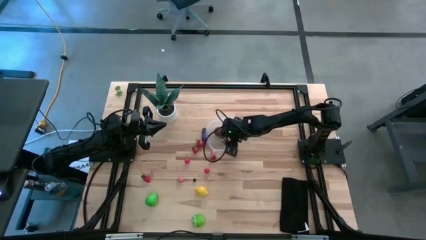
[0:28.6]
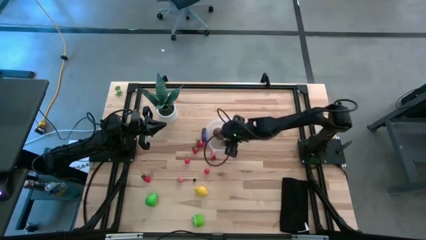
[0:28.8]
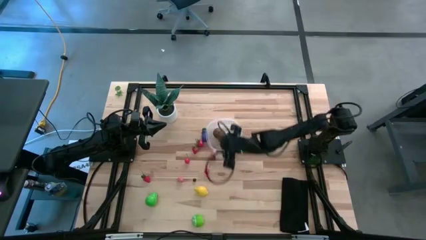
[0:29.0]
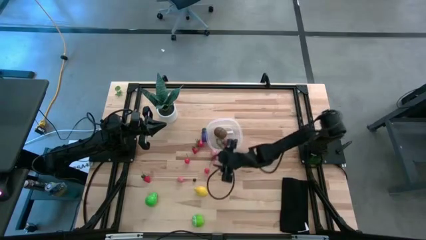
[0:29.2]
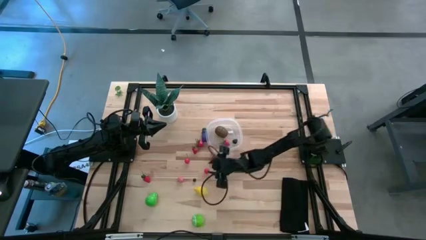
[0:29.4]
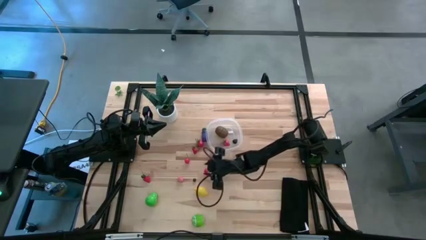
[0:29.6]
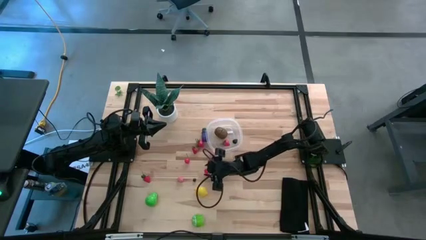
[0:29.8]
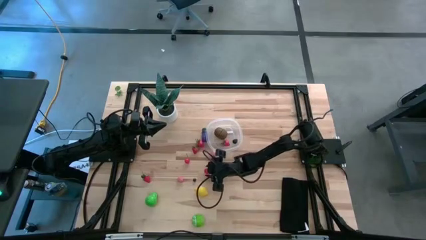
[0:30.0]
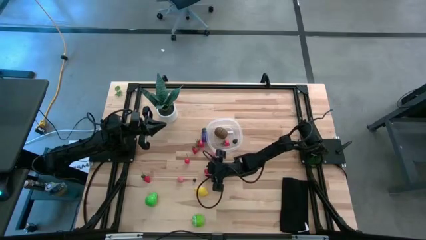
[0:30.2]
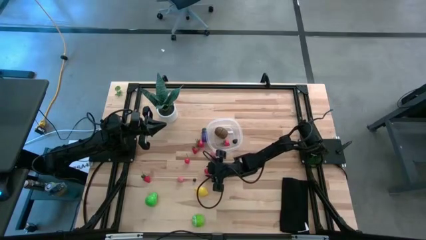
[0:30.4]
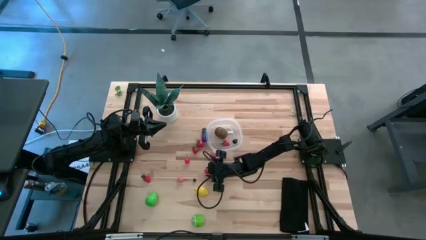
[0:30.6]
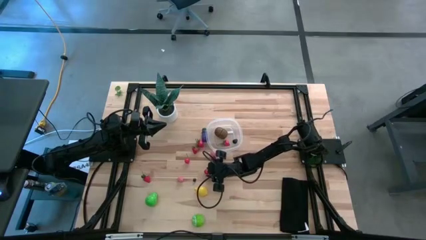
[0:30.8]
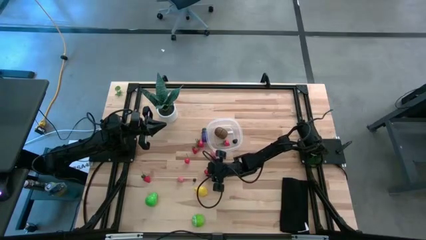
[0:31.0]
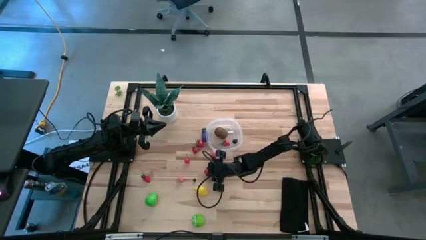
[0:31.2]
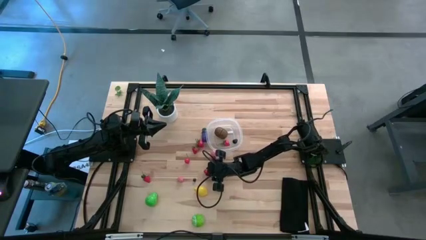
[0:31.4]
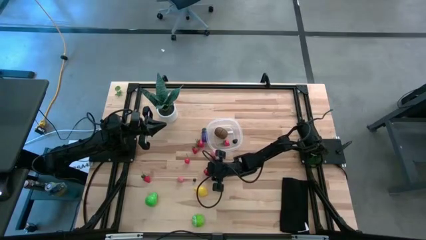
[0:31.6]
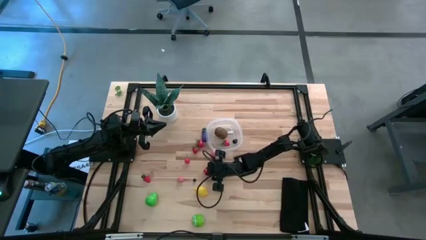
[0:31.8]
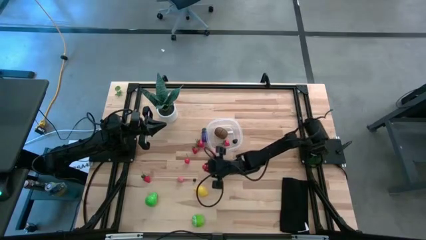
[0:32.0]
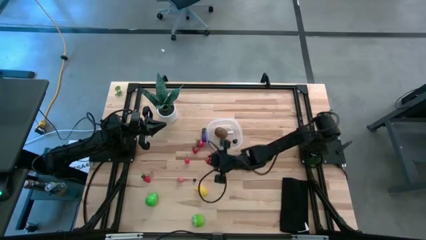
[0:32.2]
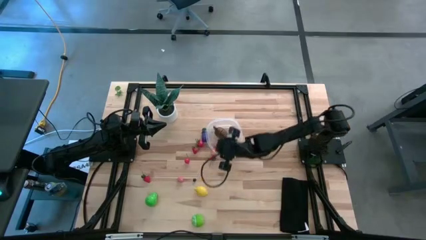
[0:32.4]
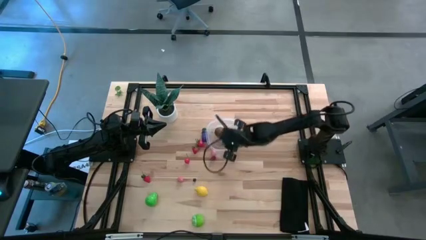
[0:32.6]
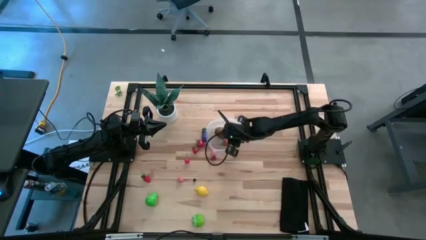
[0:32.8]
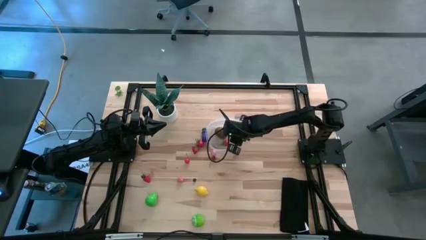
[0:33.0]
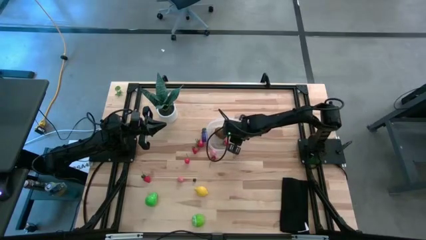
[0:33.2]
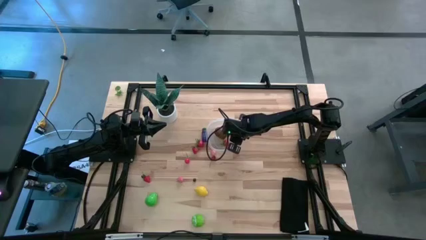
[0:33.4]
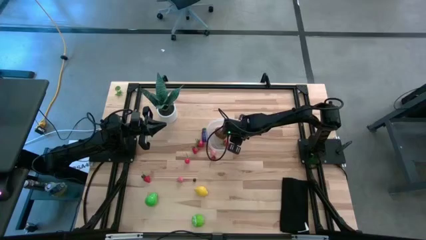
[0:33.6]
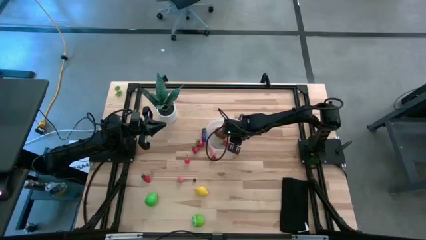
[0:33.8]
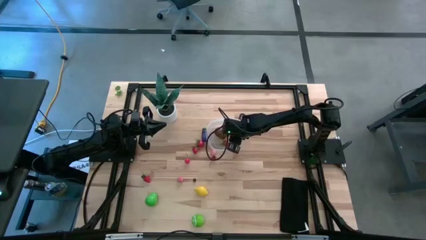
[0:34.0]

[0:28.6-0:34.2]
Task: Pick and placing Produce into tupperware
Put the bottom cherry into the transparent bin

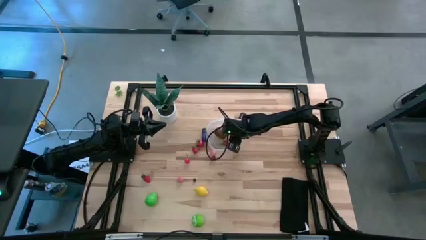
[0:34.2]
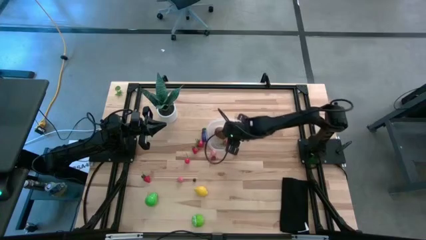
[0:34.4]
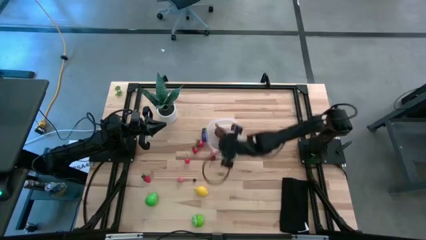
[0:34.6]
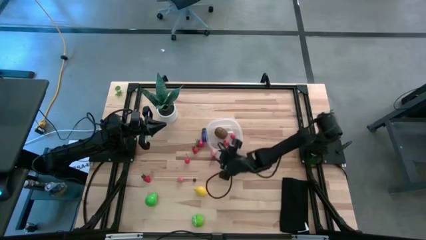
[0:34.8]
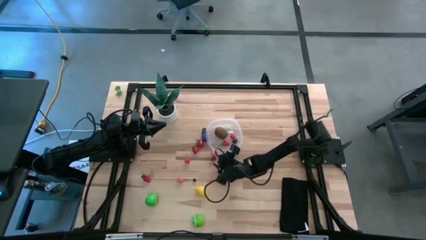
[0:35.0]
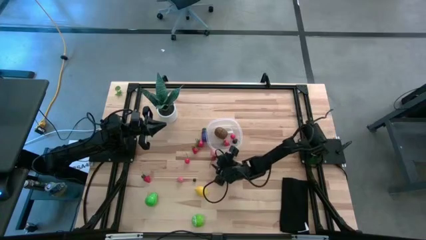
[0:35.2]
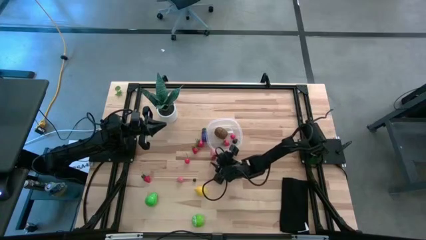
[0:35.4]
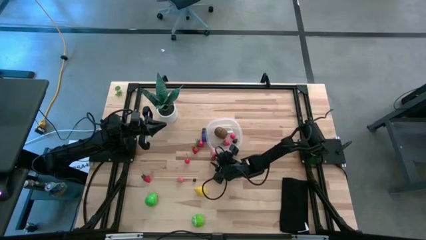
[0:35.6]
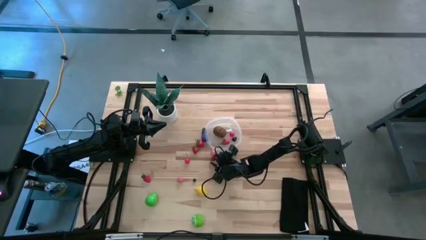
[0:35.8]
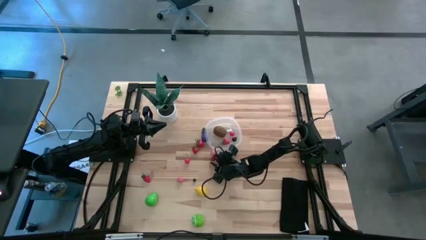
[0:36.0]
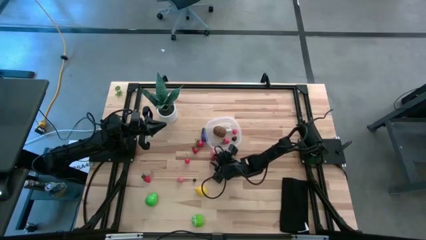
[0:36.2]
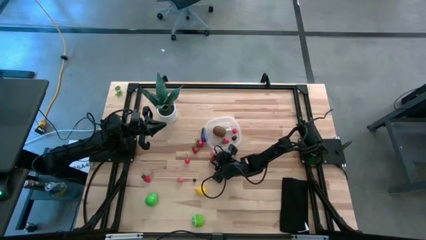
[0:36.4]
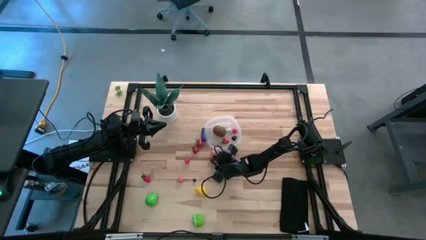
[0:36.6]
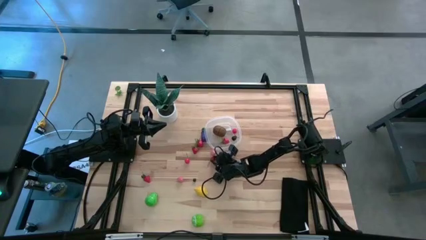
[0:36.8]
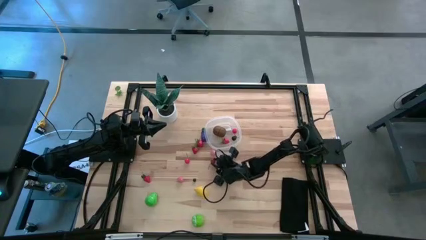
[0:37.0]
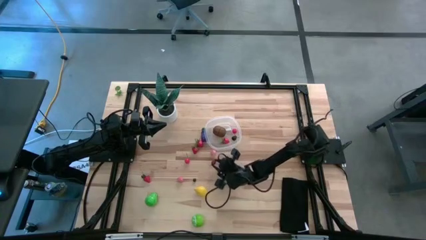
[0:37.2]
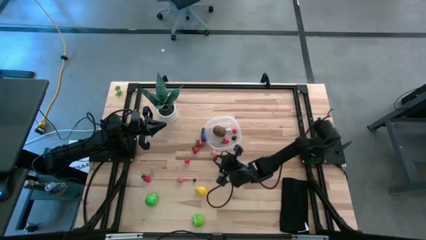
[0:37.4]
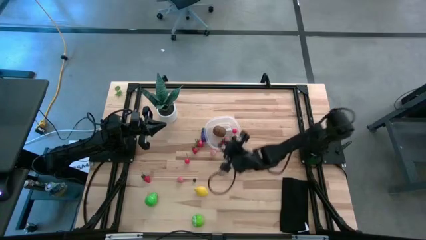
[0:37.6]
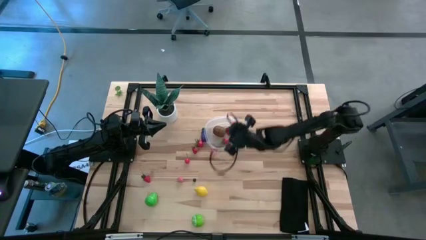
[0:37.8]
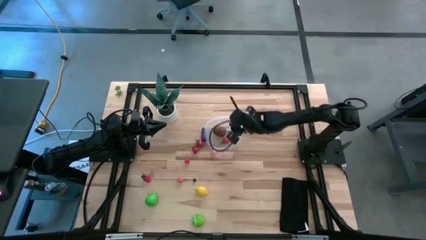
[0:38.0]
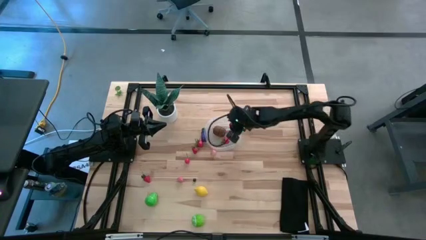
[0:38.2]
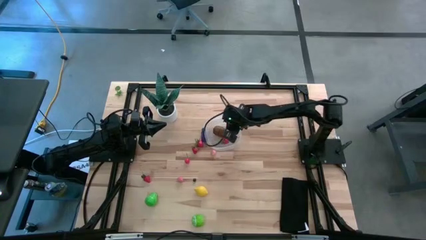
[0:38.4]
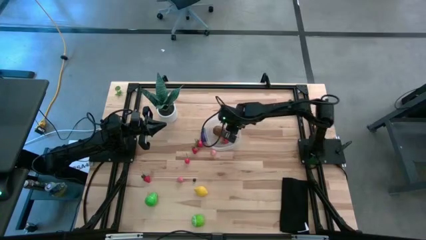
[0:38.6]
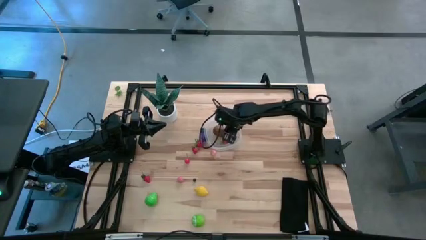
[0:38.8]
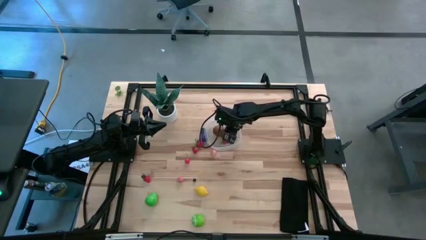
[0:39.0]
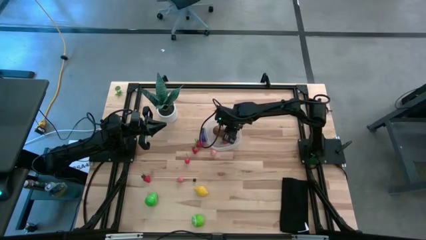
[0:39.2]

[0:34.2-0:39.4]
Put the right cherry into the transparent bin

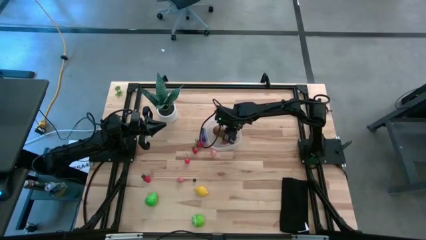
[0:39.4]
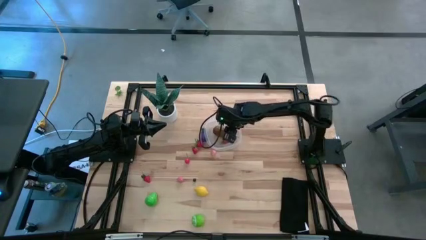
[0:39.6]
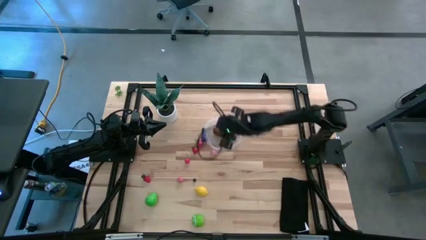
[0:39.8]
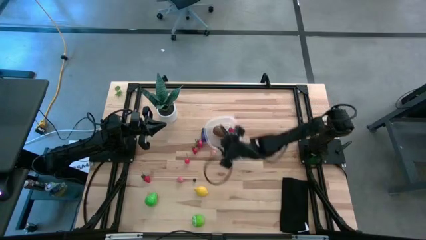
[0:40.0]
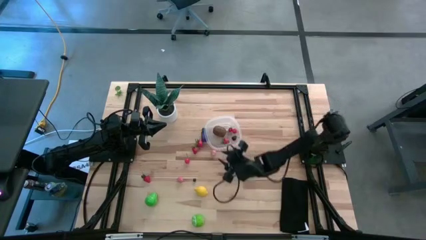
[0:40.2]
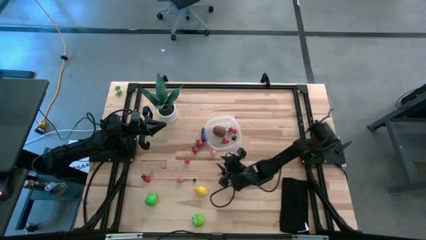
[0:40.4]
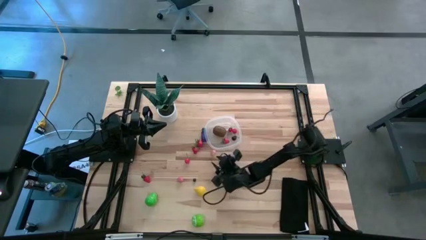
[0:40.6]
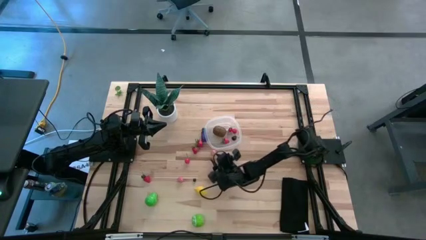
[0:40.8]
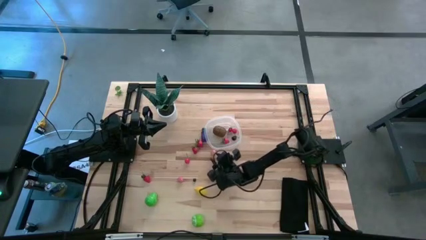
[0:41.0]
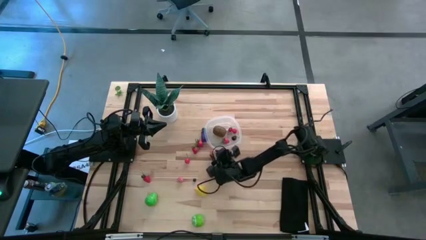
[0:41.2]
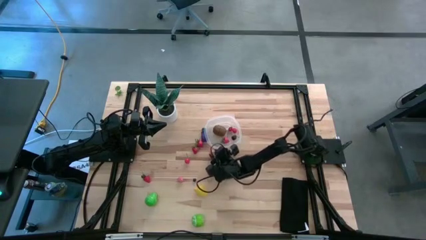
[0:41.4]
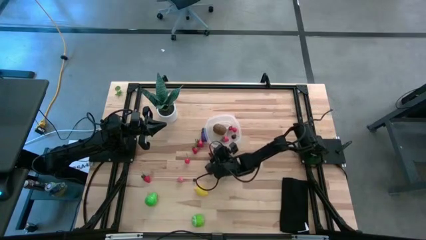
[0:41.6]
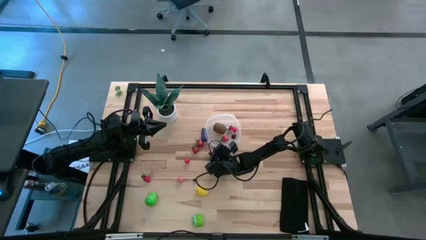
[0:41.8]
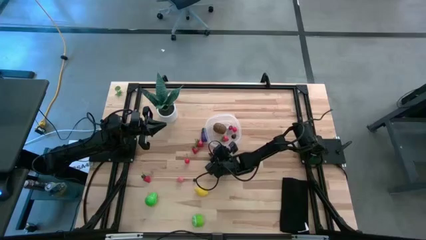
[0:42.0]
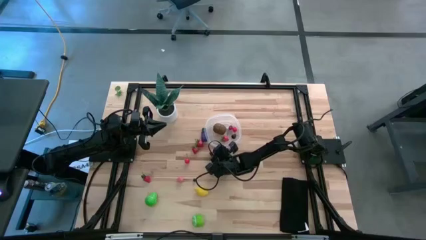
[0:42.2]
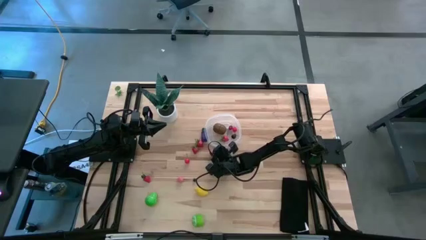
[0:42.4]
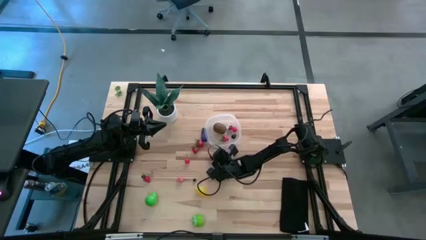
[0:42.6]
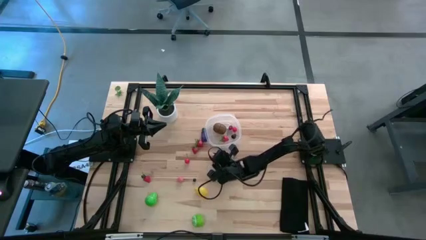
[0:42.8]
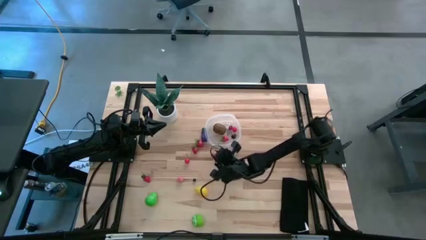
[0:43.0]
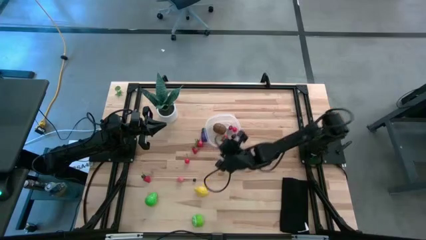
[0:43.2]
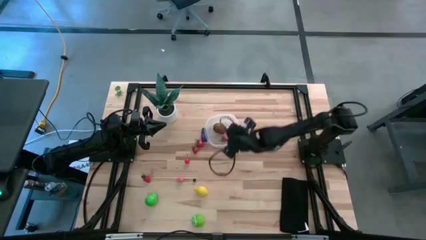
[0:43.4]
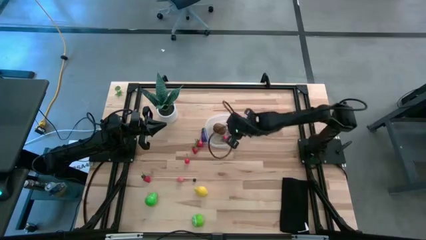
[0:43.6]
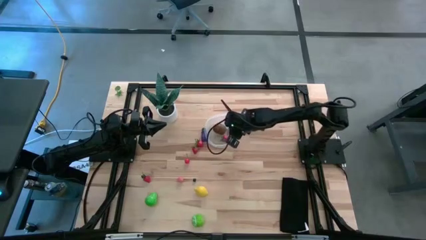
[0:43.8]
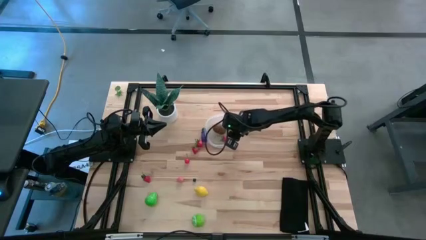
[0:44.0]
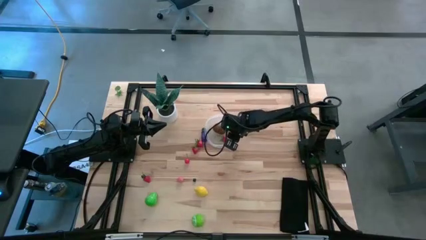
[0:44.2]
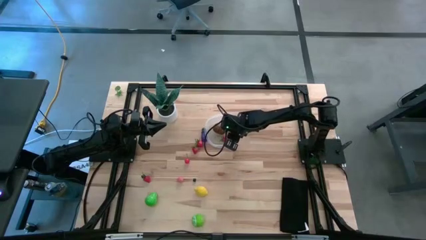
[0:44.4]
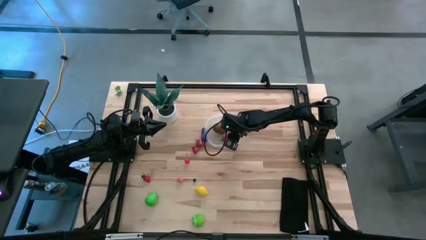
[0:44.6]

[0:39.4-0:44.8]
Put the top peach into the transparent bin

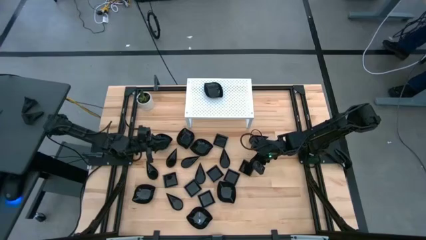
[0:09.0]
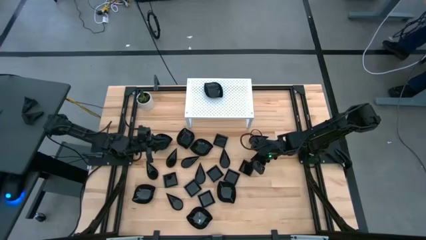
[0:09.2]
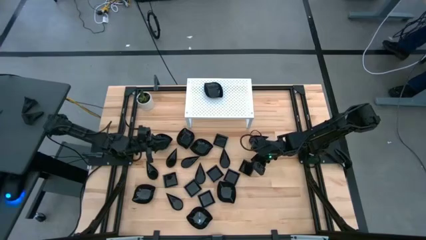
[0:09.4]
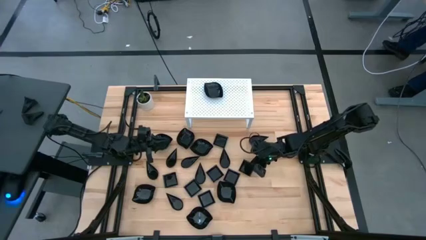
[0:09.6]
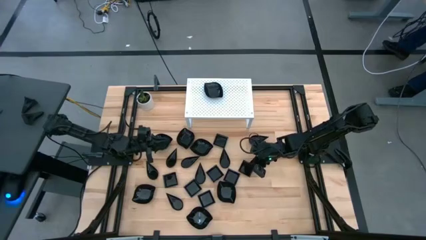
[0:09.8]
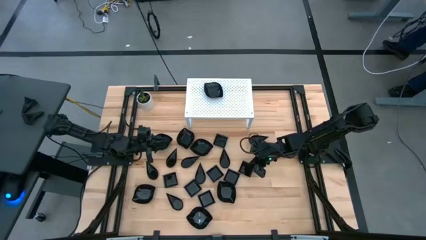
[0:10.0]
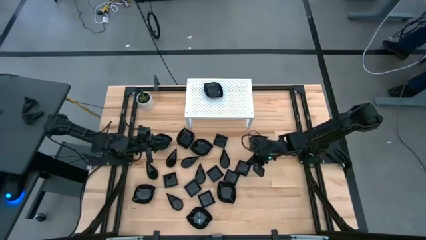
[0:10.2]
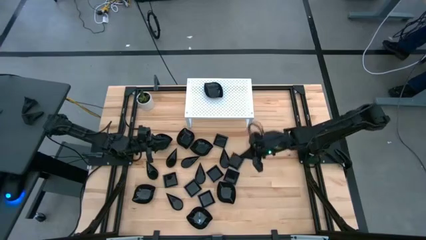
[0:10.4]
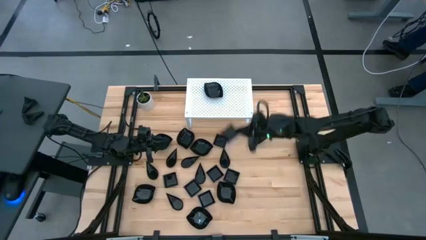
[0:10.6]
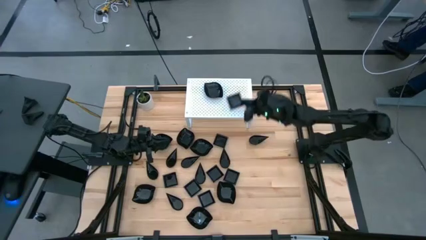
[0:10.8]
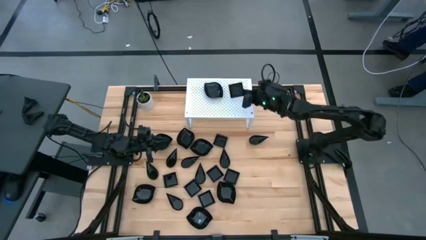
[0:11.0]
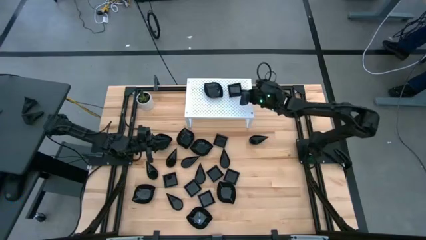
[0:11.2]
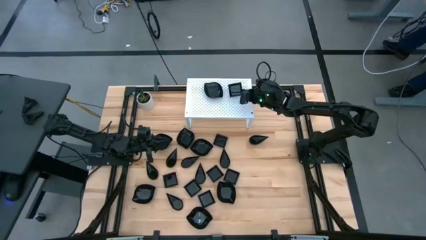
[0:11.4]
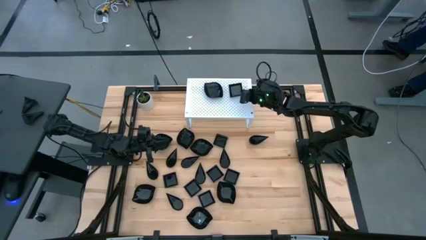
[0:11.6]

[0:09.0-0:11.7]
Task: Pick & Place Mini shaped plates
Put the black square plate on the shelf
